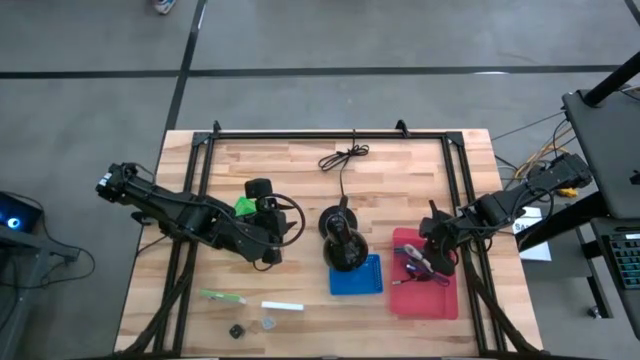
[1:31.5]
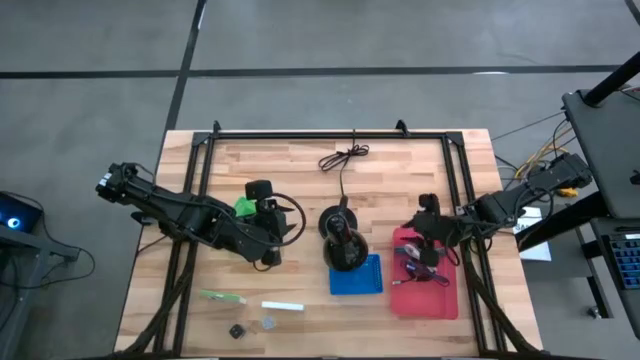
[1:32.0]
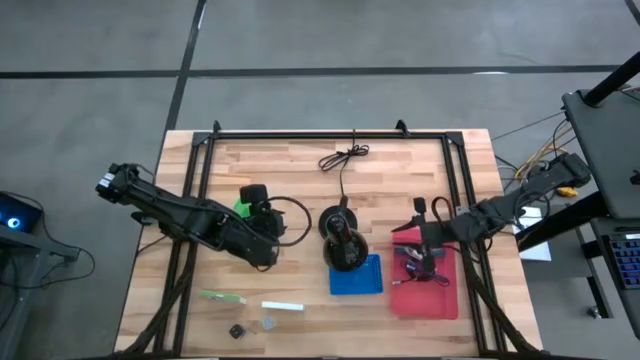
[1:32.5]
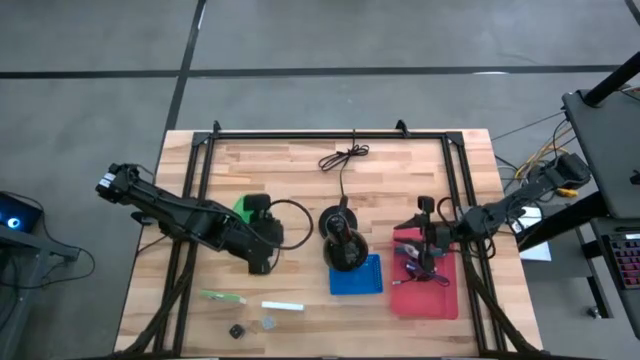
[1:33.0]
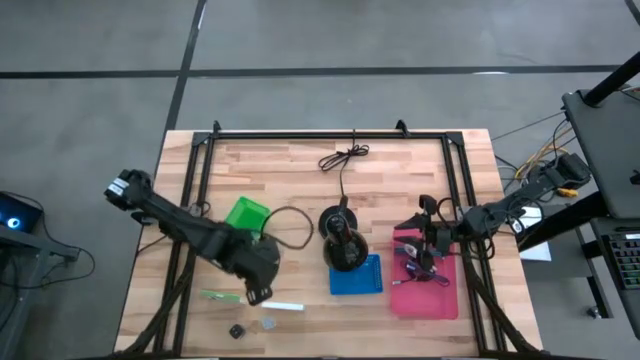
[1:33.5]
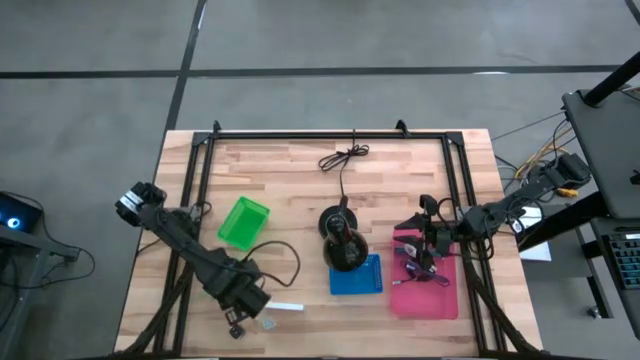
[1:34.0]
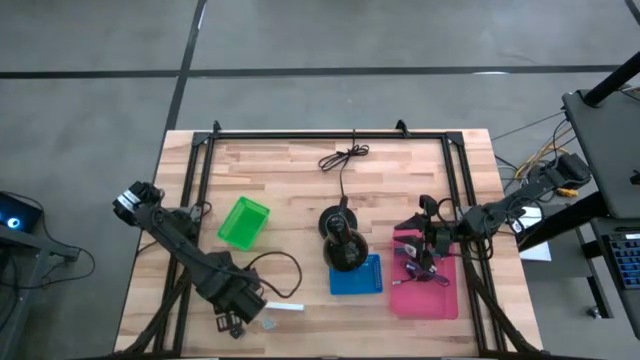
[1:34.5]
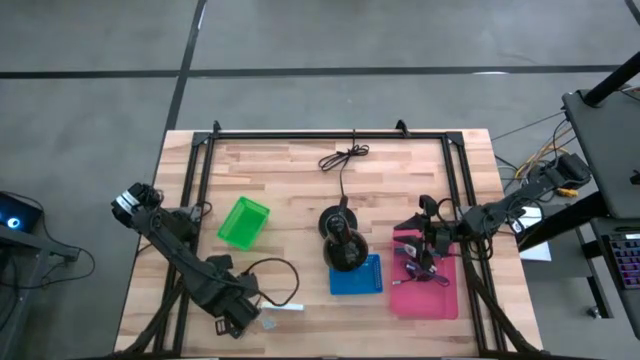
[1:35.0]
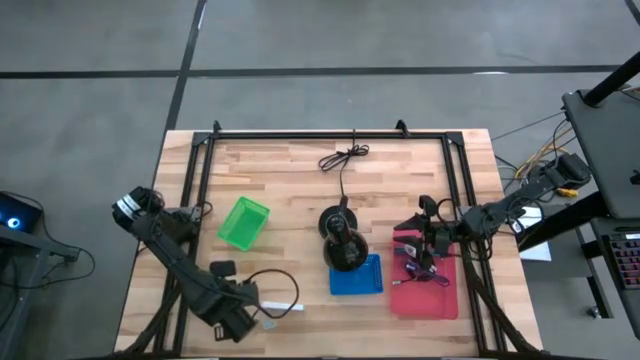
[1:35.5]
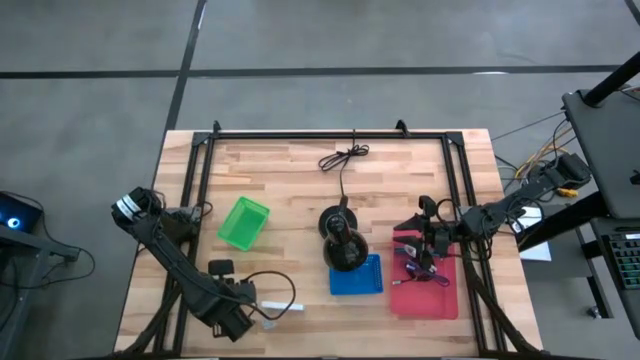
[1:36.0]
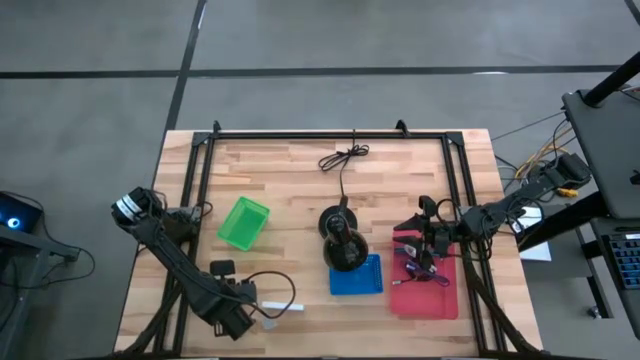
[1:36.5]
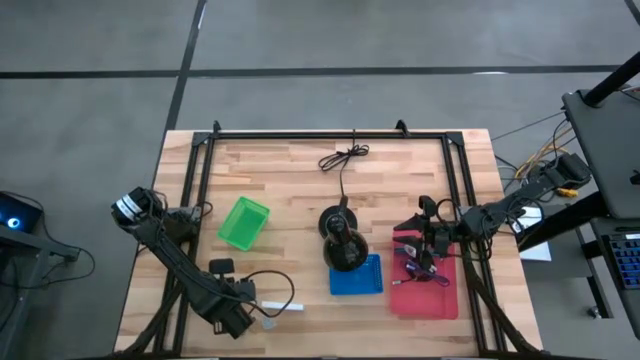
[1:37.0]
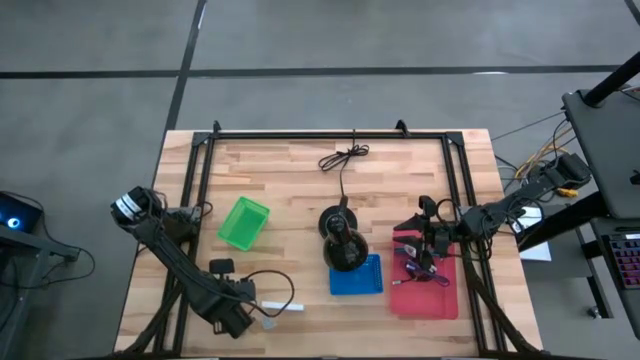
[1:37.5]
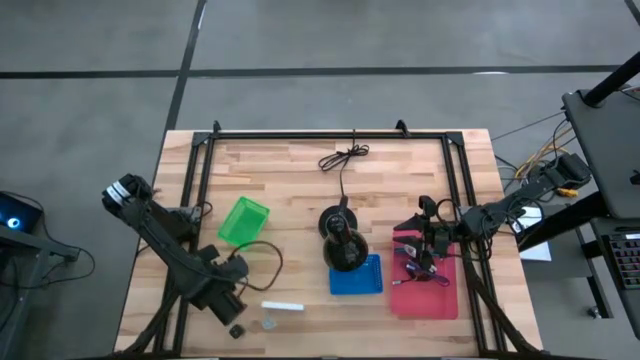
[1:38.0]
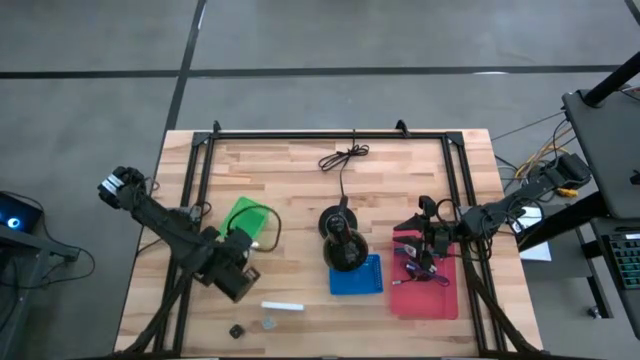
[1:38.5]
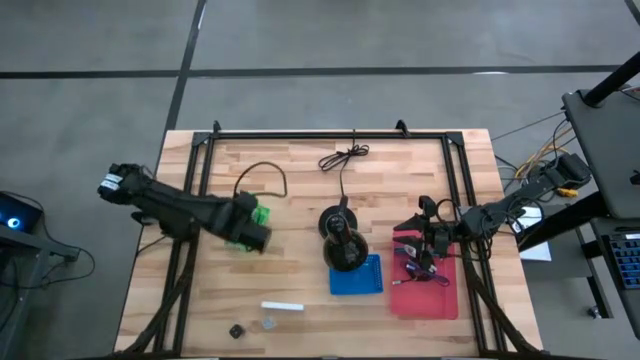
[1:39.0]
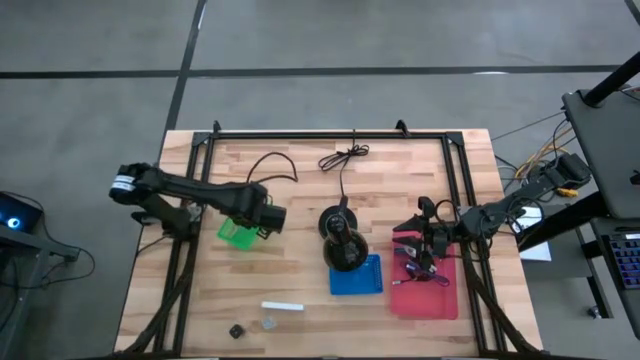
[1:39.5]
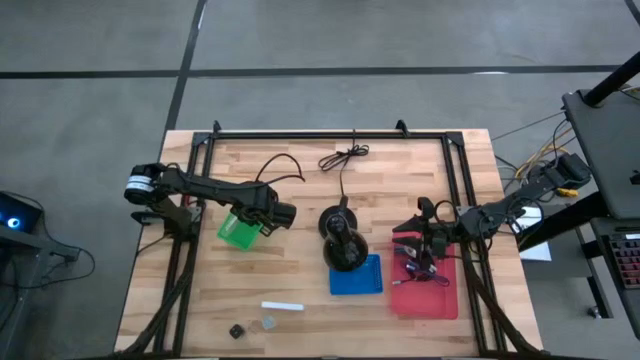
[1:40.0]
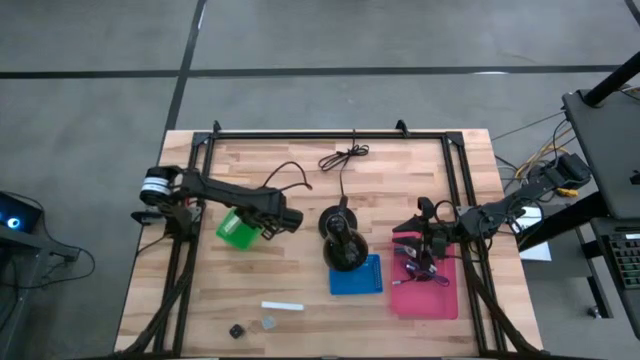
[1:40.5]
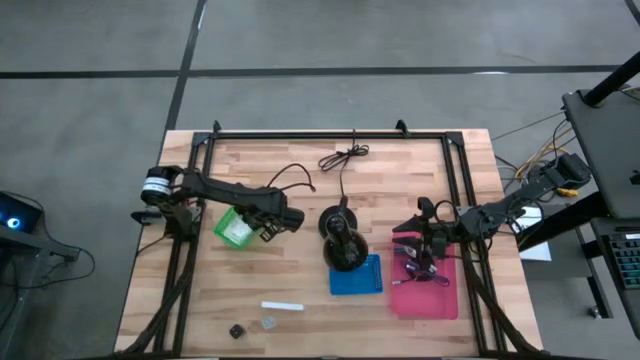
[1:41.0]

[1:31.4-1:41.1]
Task: Pick and place items into bin
Put the left card reader box into the green bin

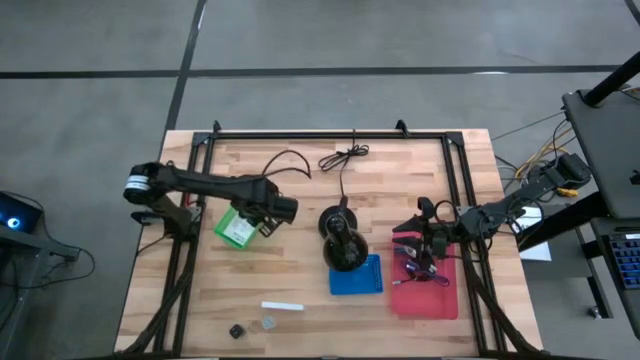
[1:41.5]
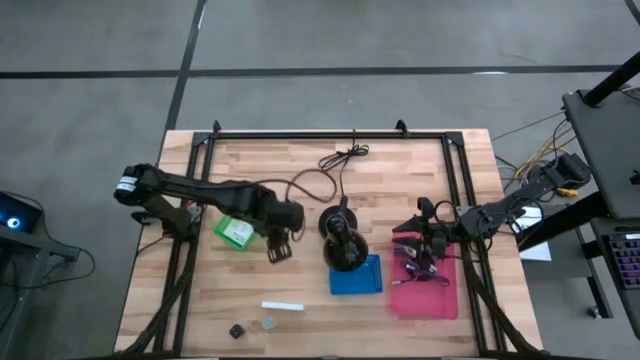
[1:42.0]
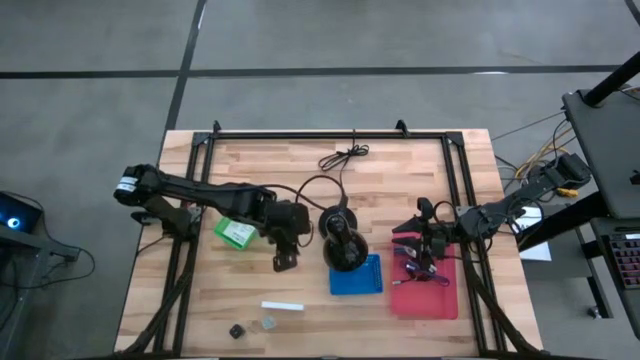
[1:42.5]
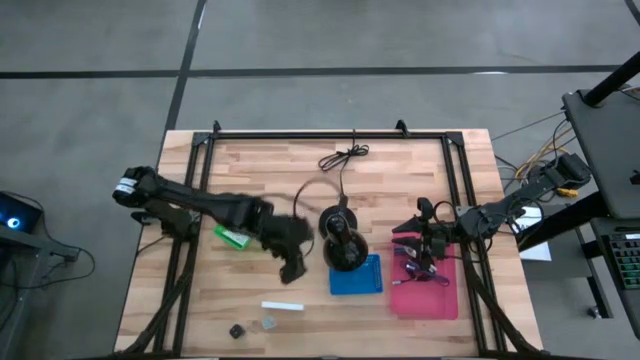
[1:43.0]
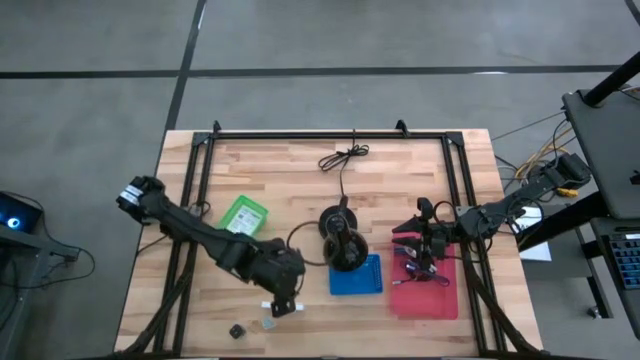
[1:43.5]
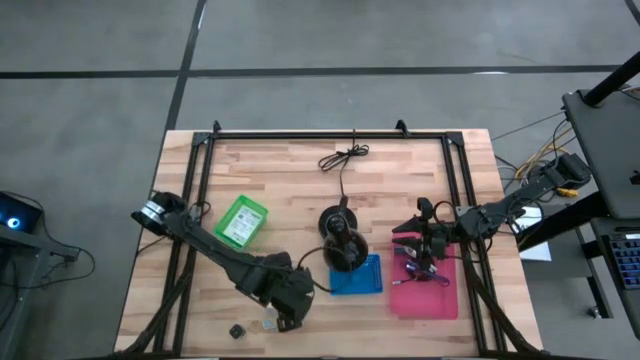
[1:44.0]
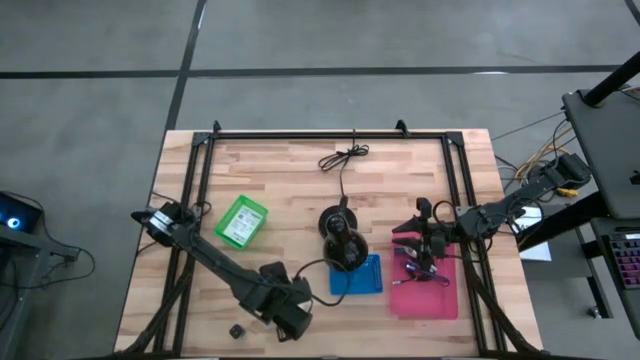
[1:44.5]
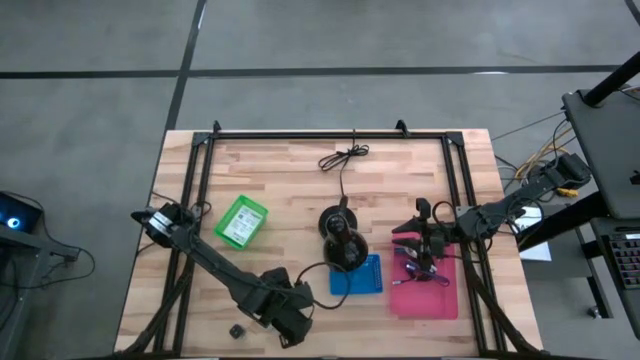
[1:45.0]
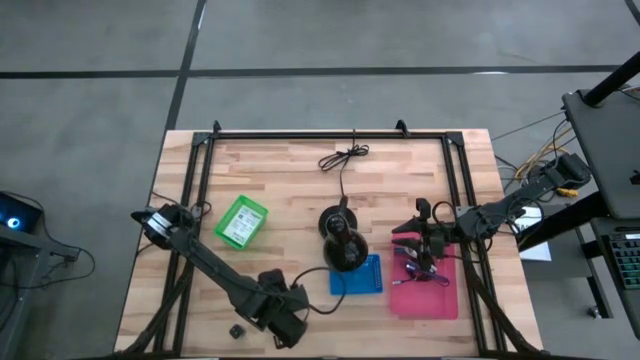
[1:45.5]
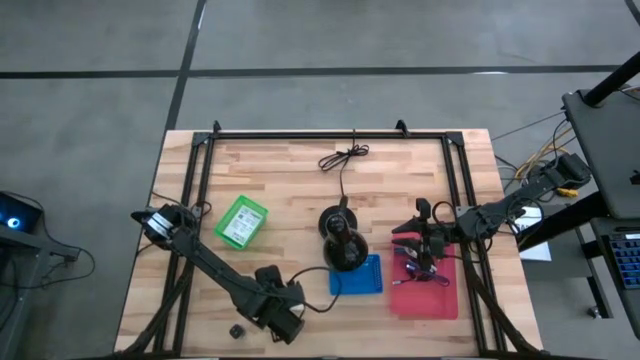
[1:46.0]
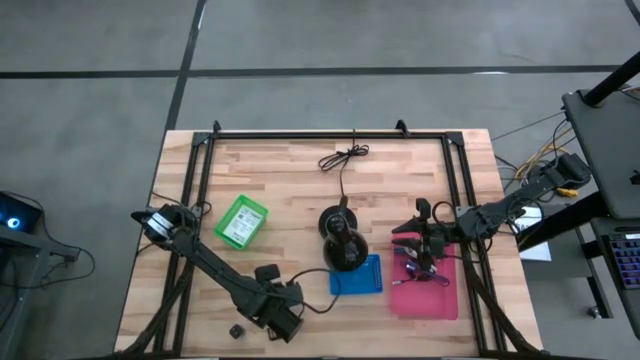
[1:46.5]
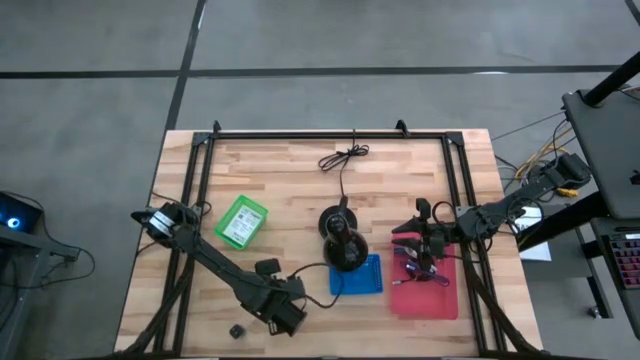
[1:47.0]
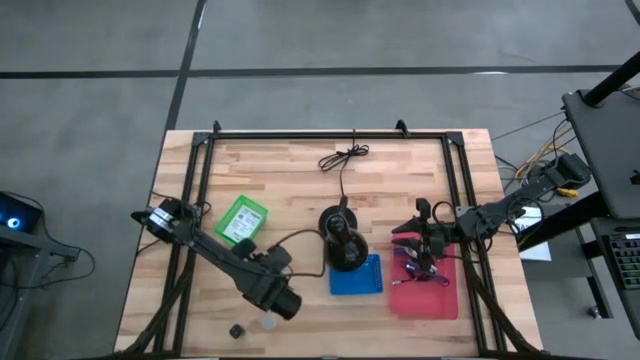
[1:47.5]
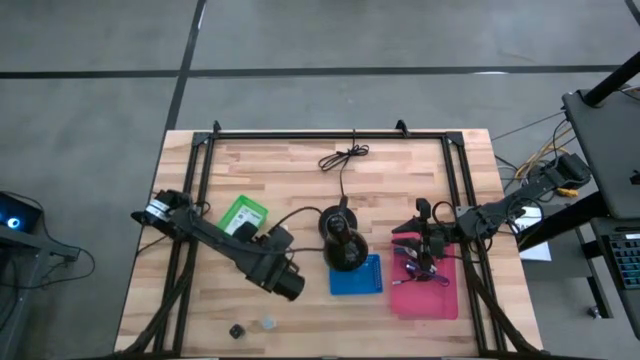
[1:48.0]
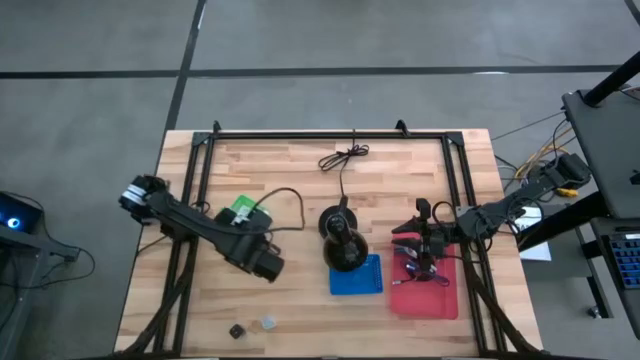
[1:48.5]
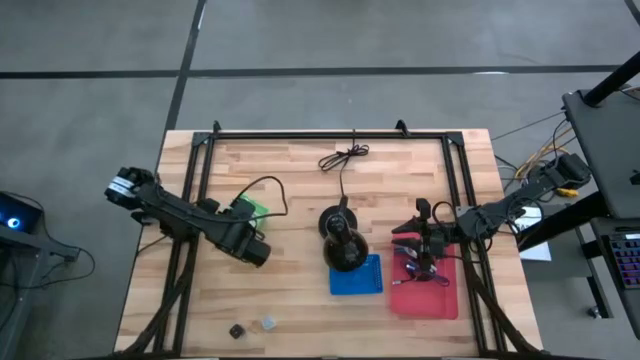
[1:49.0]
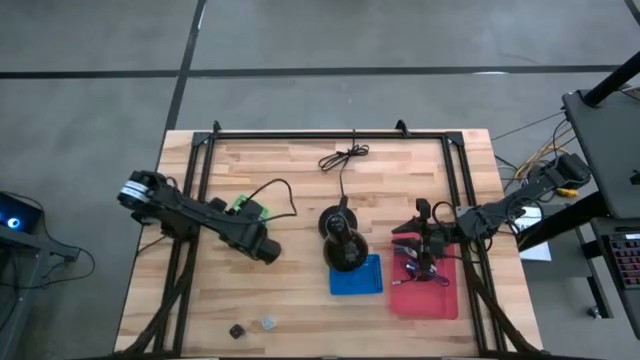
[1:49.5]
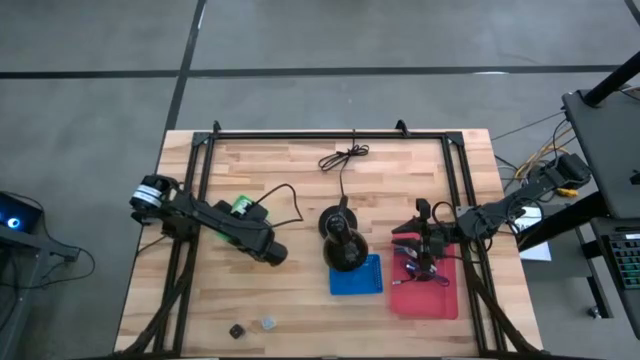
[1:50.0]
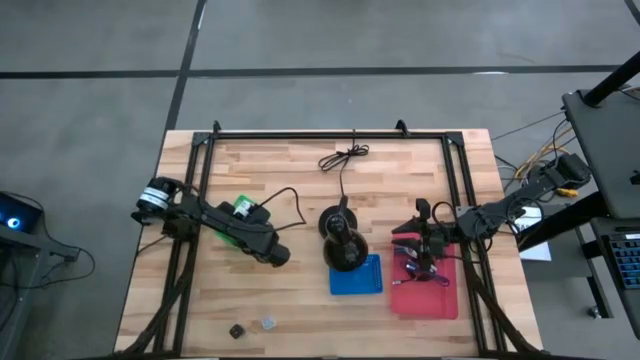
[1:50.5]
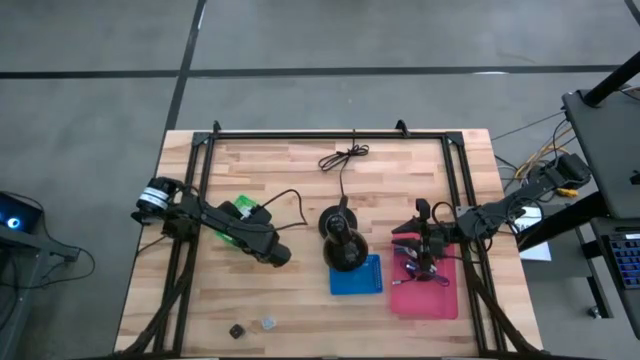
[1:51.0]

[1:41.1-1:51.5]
Put the white card reader box into the green bin

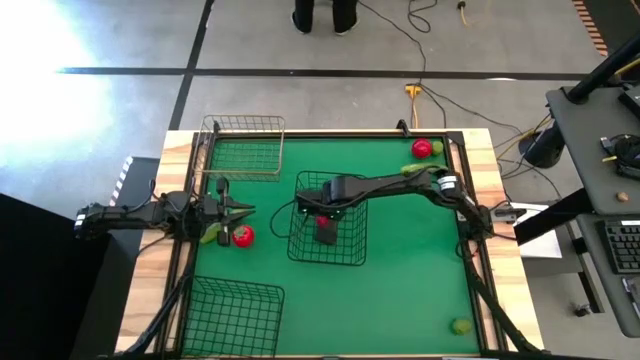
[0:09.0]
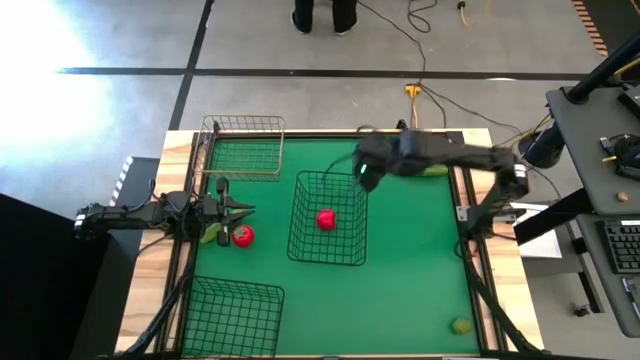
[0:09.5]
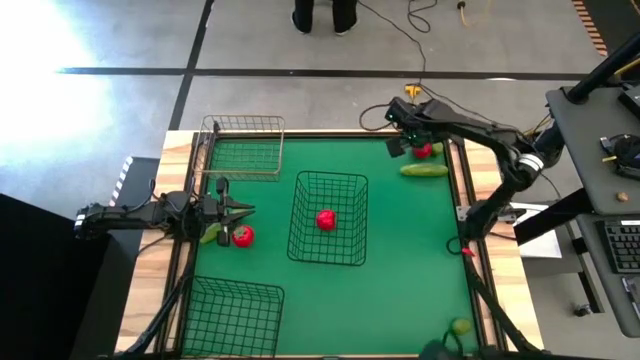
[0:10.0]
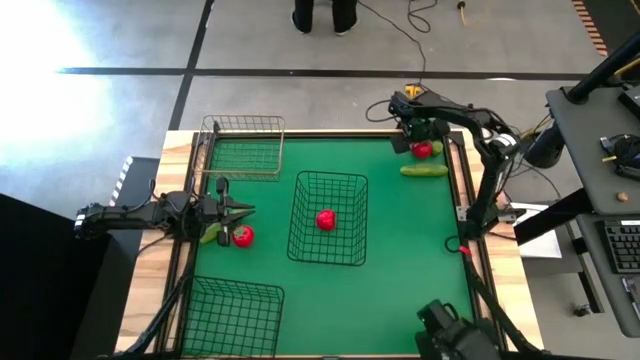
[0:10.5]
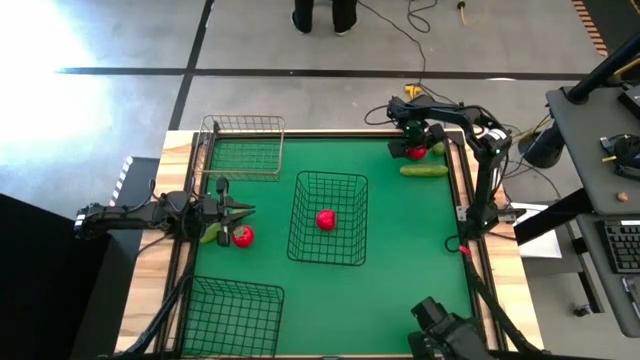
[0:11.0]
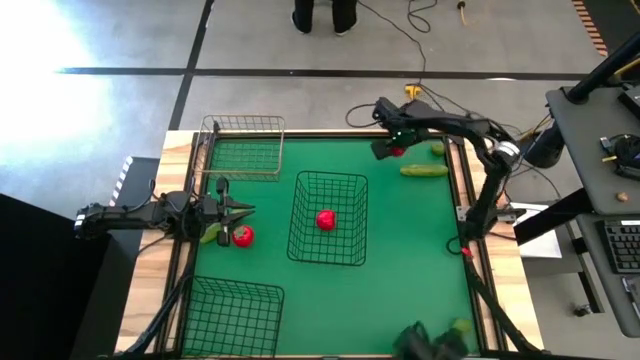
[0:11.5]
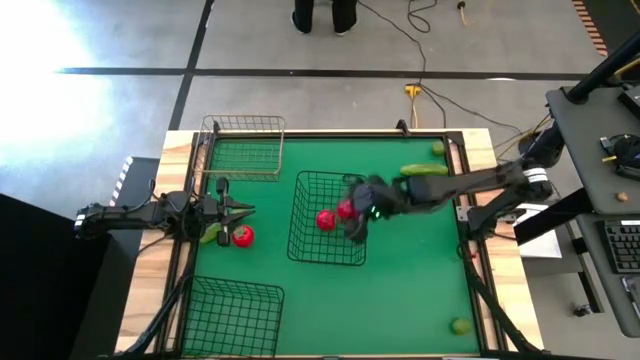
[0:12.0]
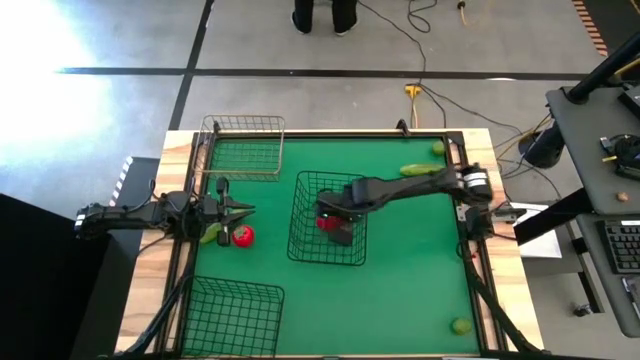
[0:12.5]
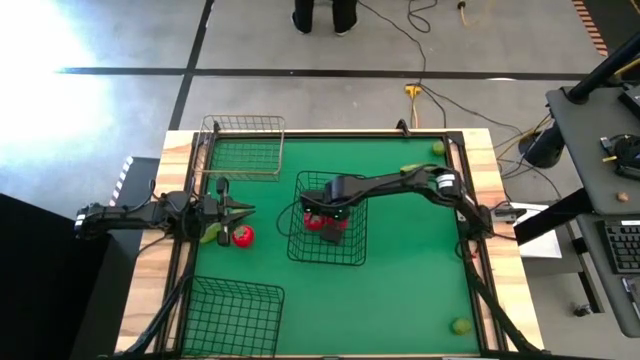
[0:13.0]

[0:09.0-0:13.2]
Task: Sort produce into baskets
Put the right tomato into the top black wire basket
